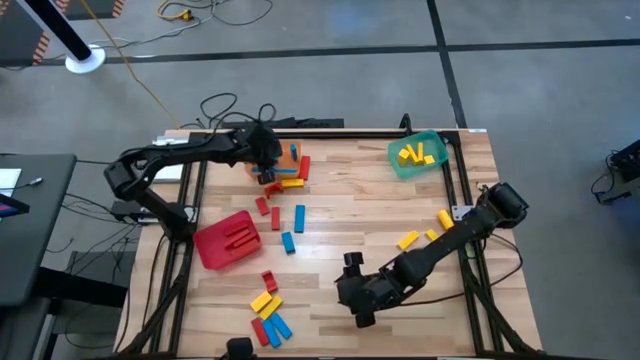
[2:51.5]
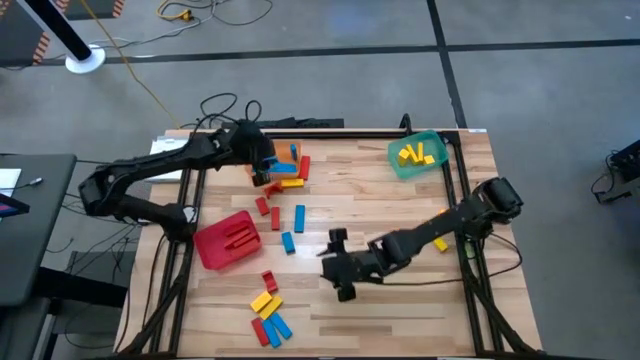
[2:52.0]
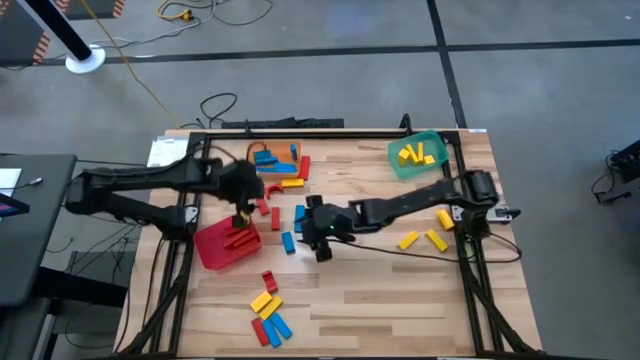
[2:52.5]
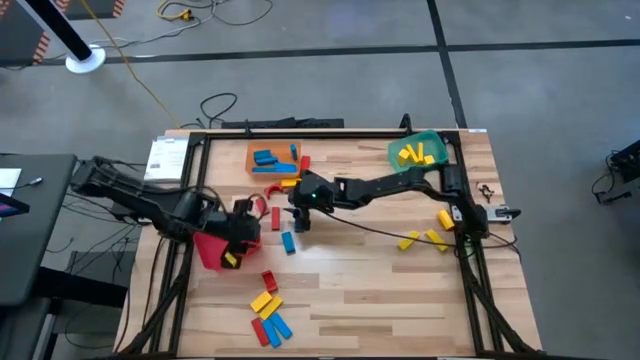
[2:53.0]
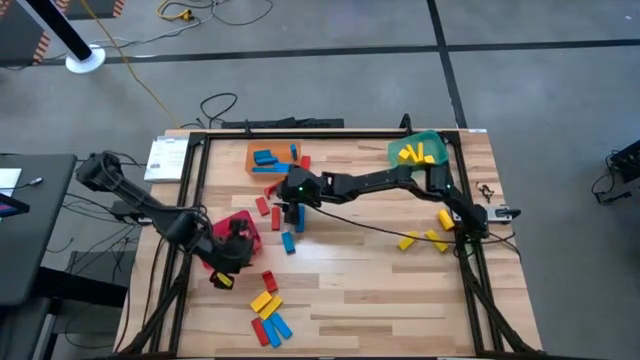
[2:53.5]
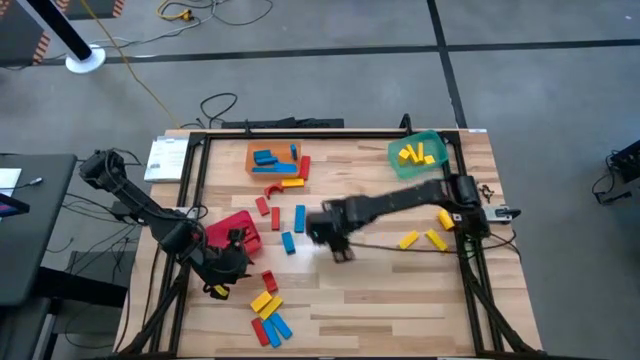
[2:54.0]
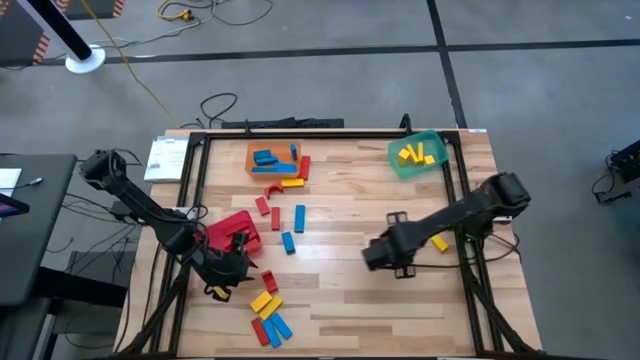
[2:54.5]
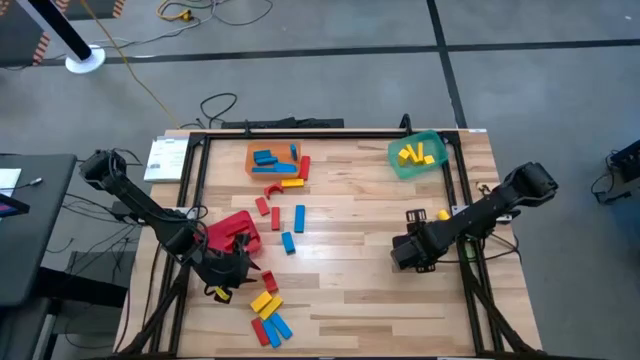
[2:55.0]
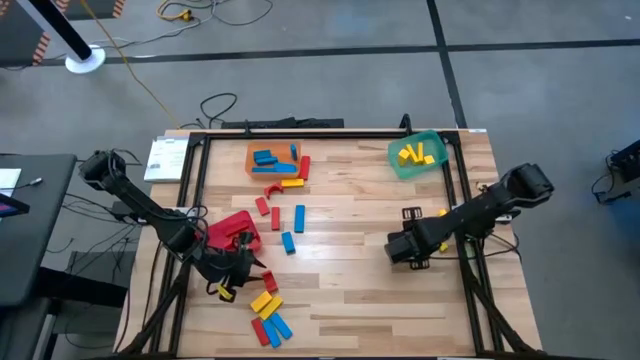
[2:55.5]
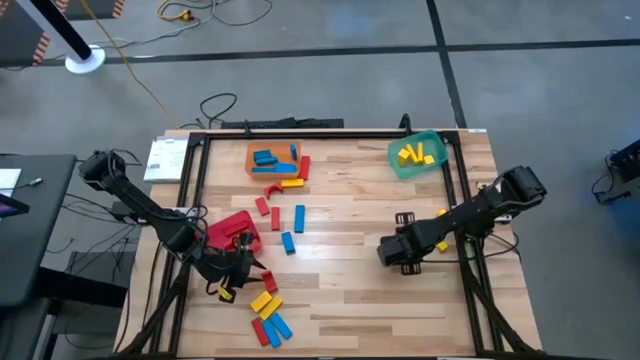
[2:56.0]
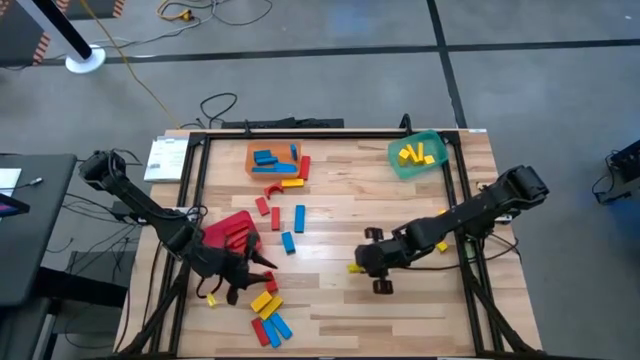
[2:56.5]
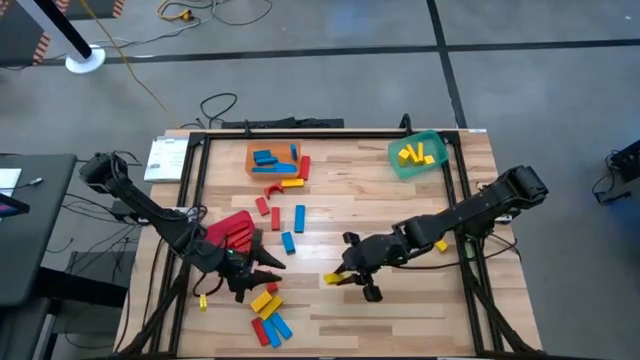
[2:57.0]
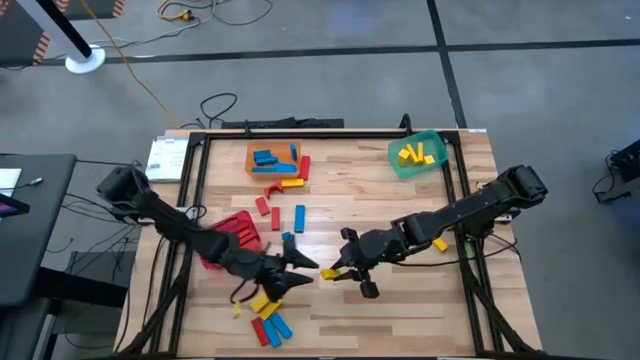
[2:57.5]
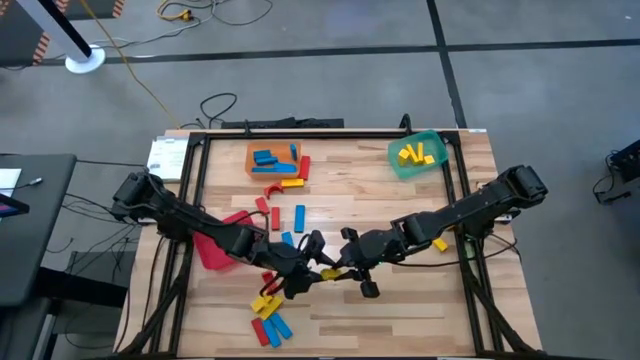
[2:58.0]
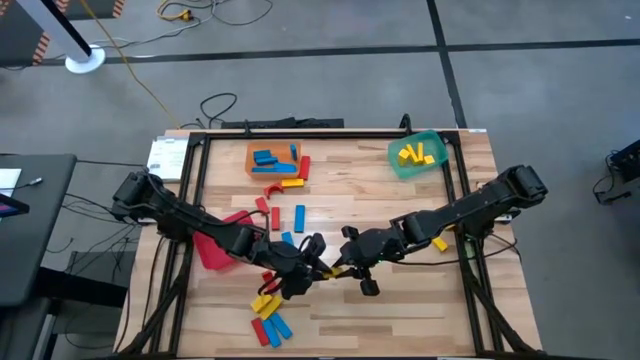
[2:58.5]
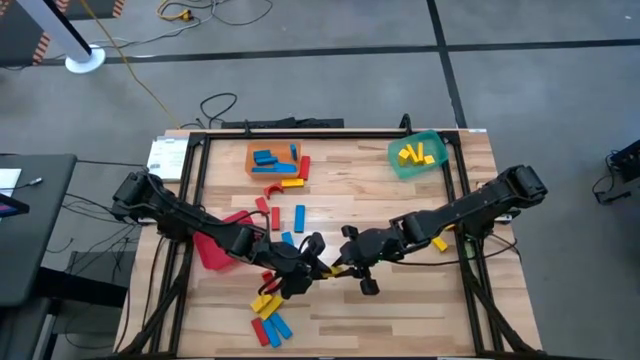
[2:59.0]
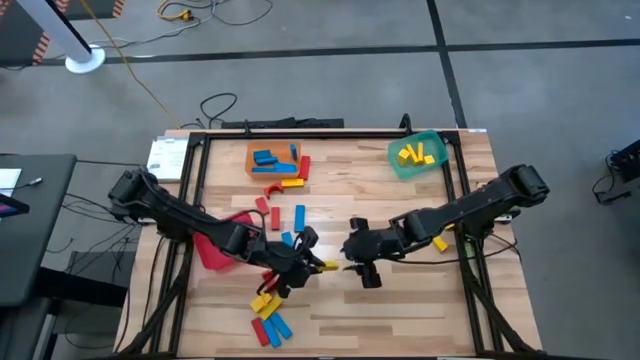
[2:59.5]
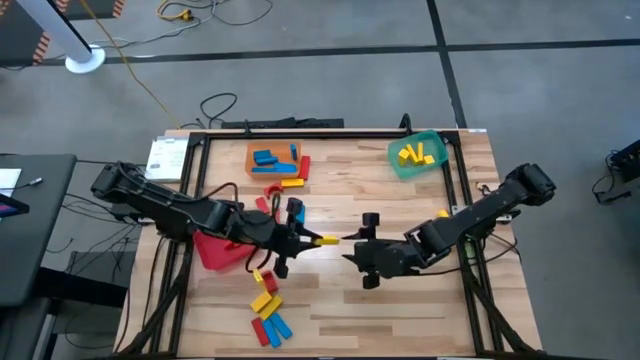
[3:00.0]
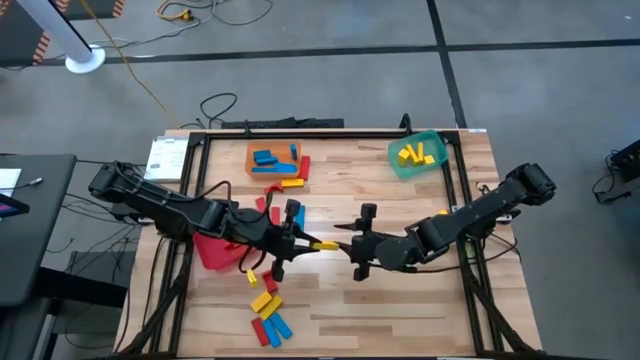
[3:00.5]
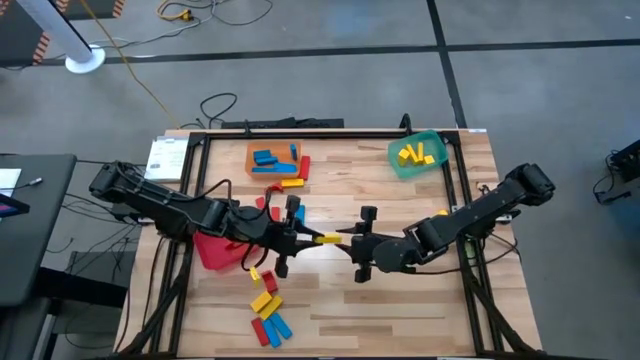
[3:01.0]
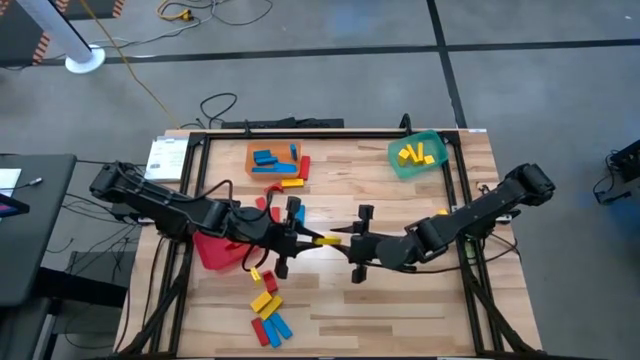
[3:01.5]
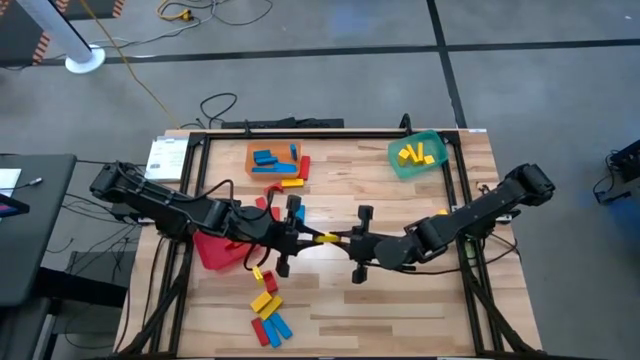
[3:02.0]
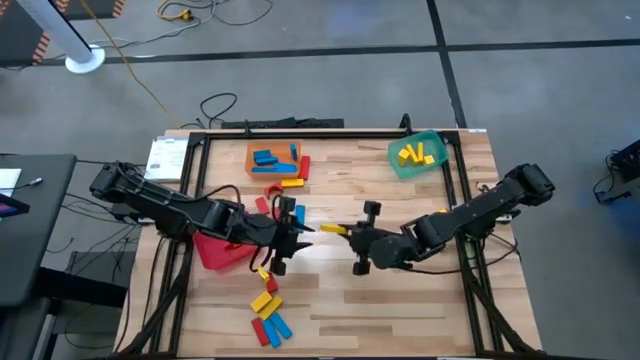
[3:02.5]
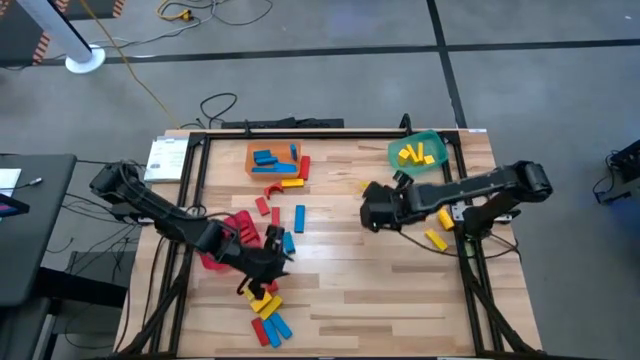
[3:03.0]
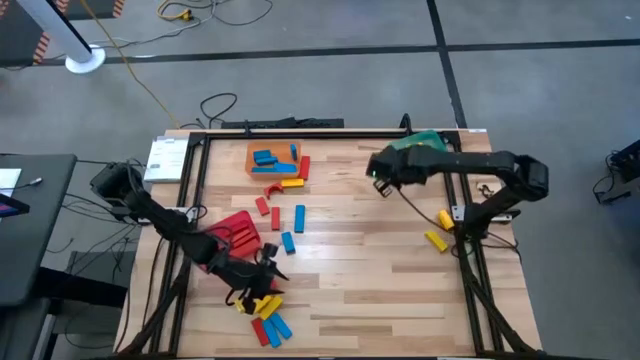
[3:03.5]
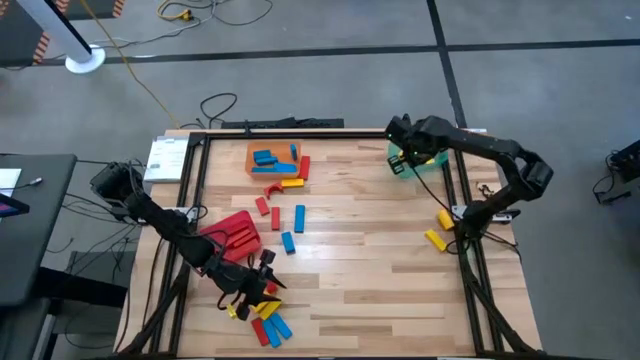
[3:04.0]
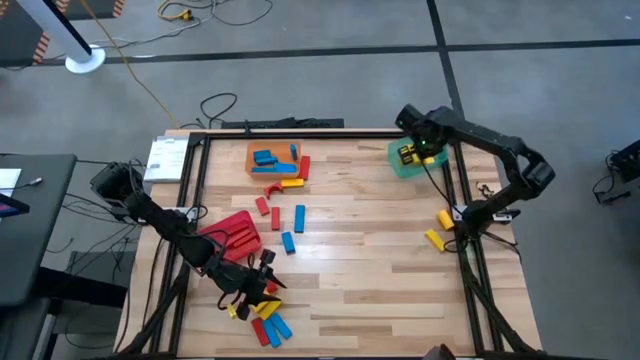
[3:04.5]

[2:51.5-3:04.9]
Task: Sort blocks
Put the yellow block into the green bin

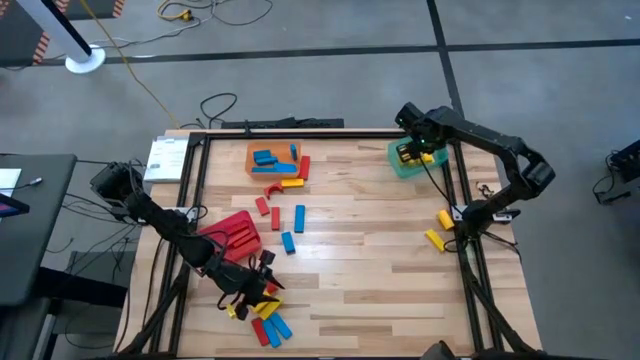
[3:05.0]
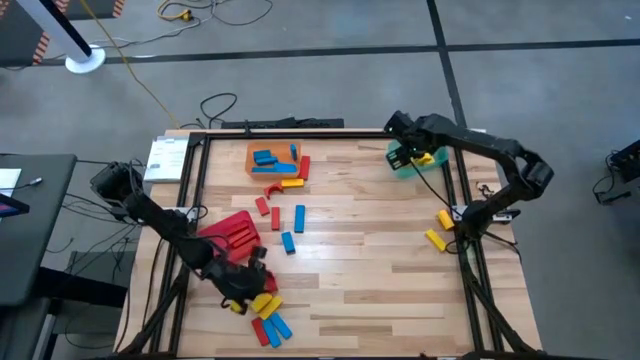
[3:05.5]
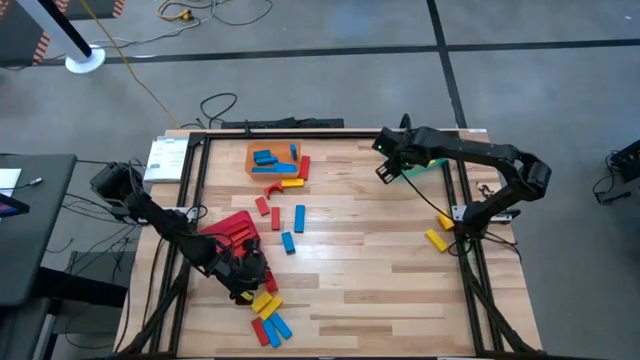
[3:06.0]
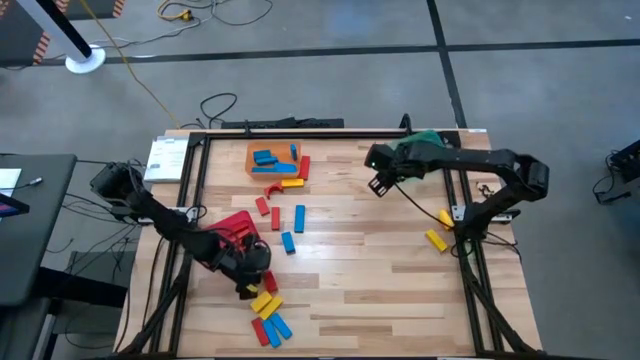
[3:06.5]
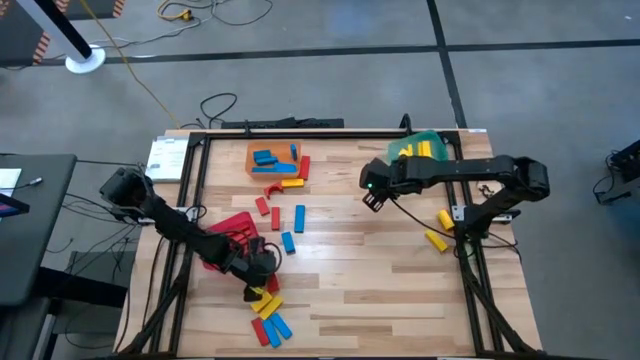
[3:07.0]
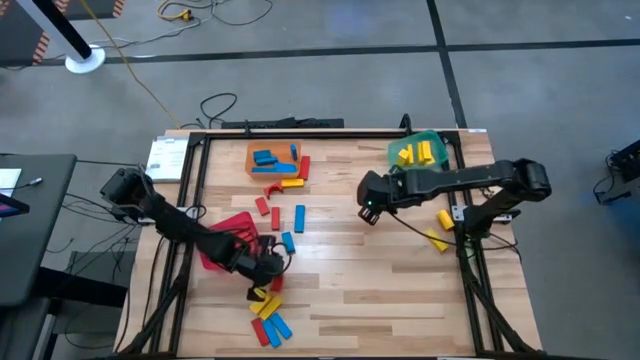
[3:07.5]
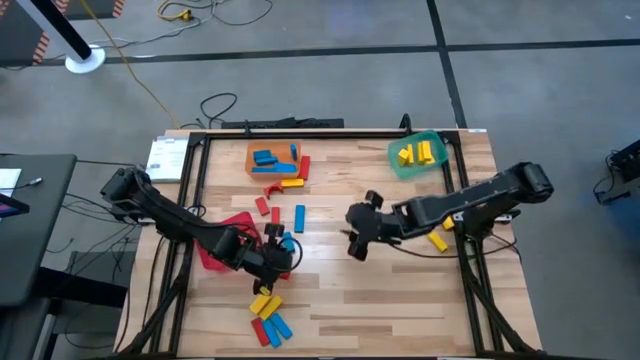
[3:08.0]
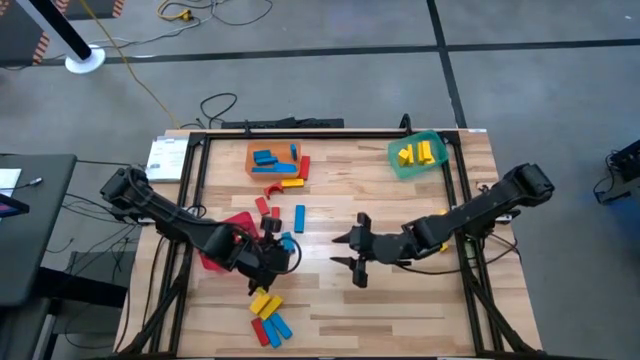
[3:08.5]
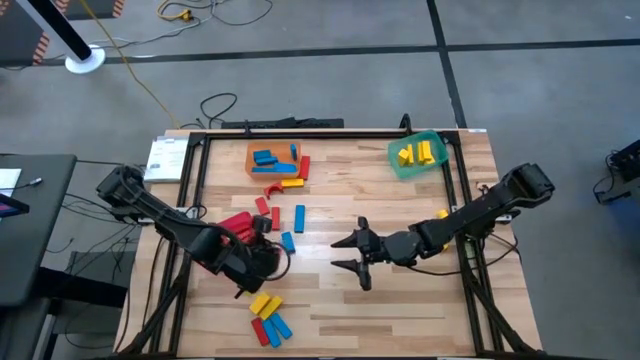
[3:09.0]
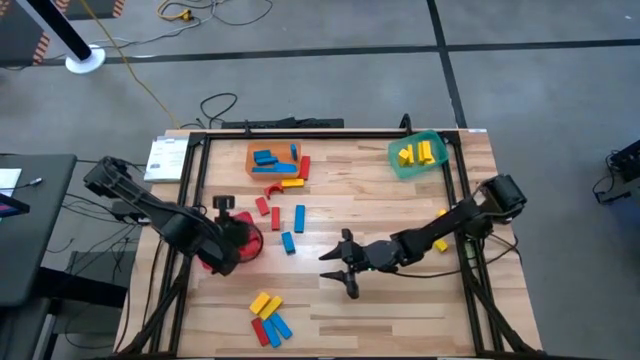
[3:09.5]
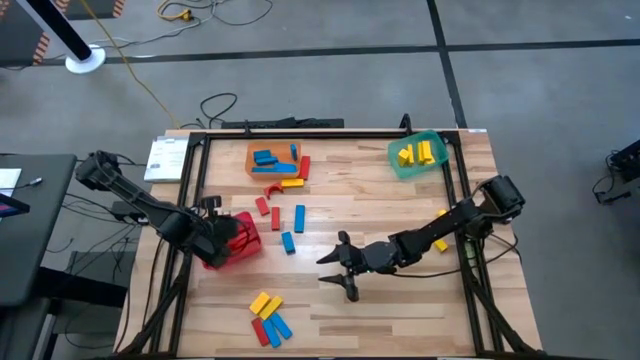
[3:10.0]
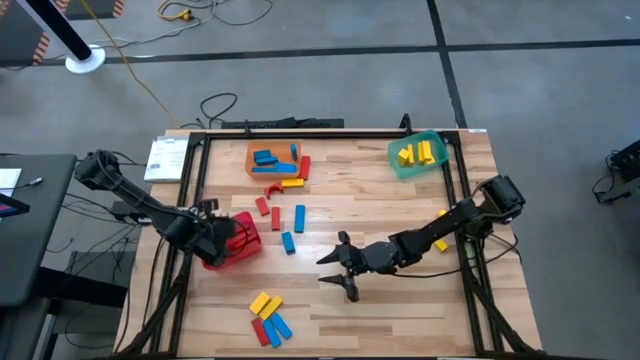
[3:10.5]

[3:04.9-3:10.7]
Put the red block into the red bin

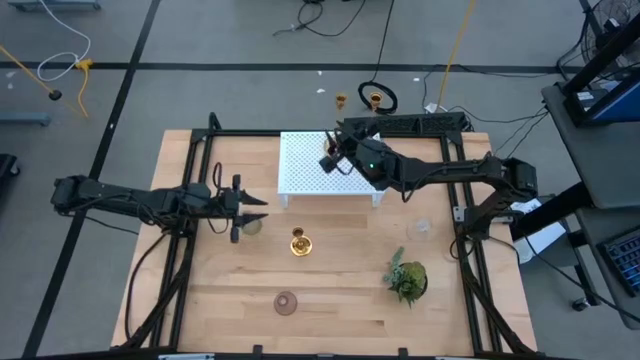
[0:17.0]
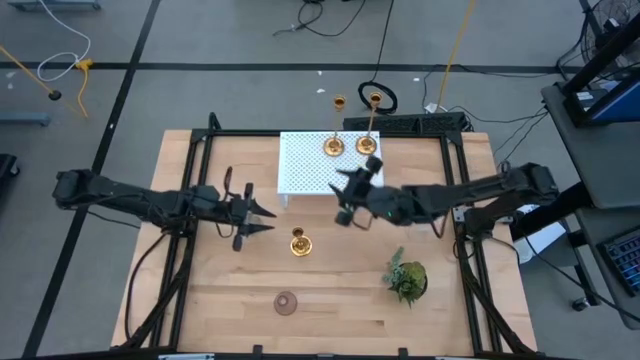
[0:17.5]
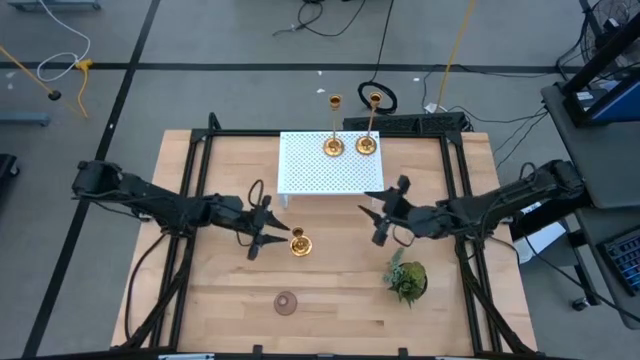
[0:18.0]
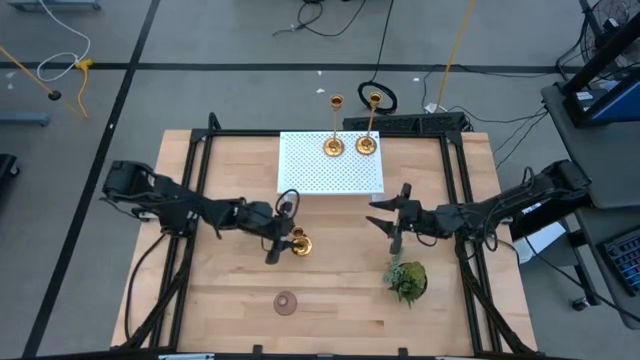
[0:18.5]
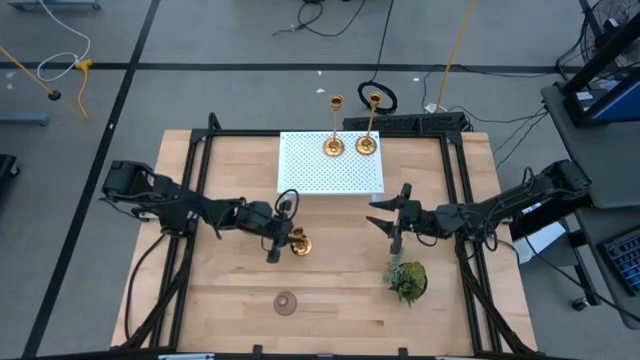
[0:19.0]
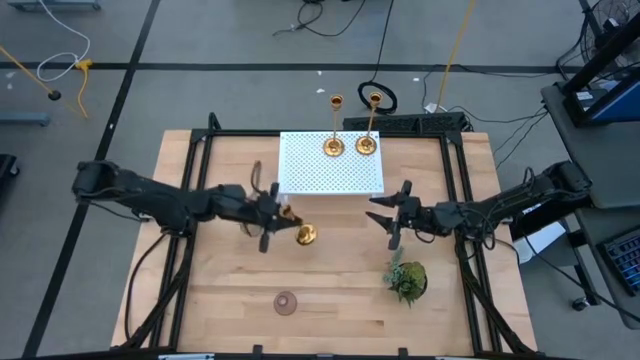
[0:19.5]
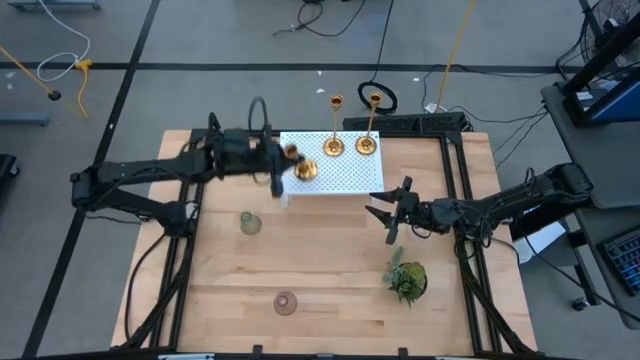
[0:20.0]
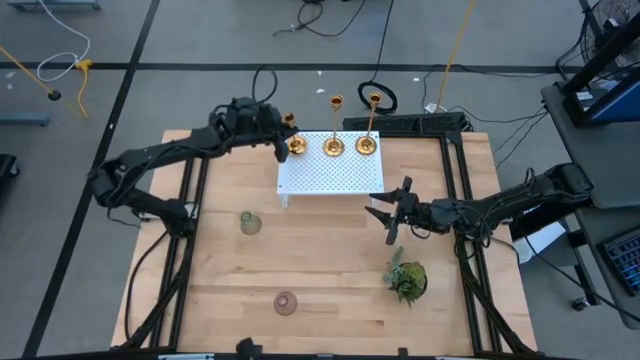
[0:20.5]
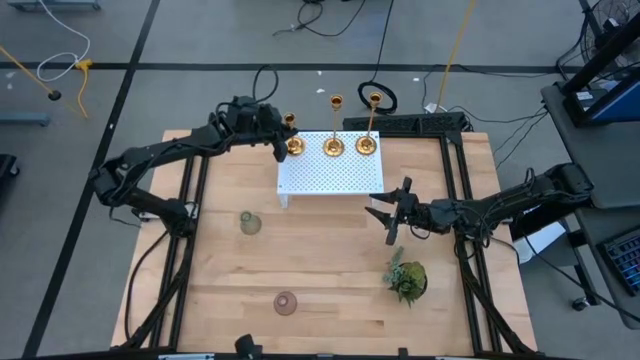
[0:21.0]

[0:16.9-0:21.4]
Task: Pick & Place candle stick holders
Put the gold candle holder on the shelf
